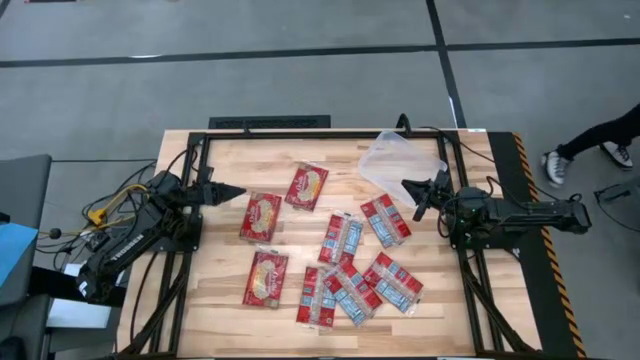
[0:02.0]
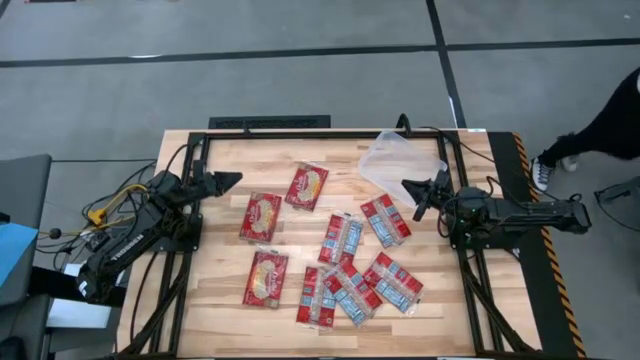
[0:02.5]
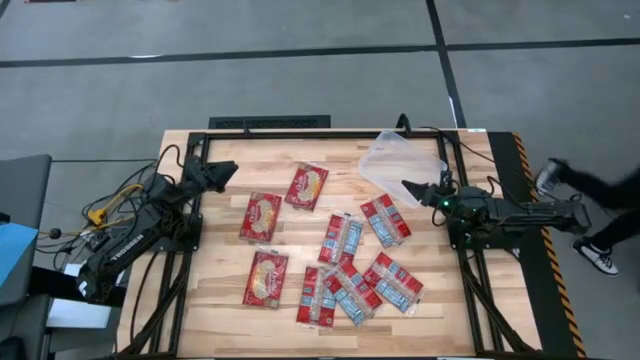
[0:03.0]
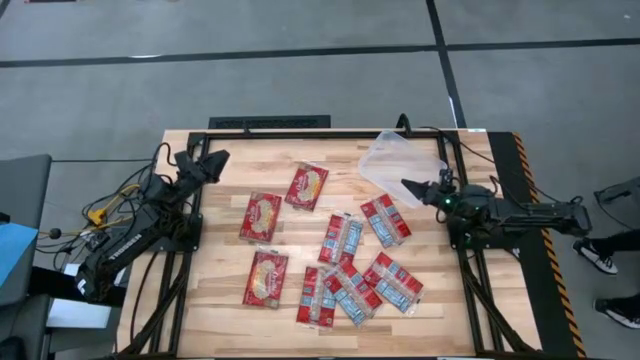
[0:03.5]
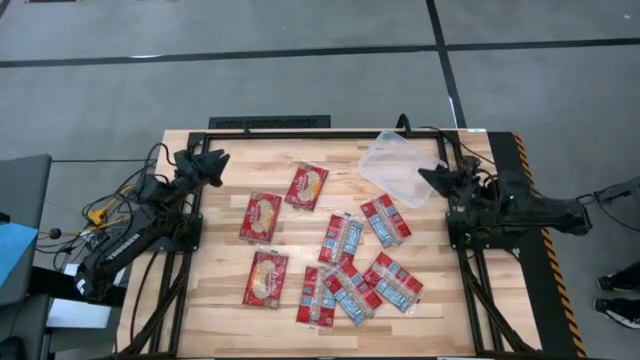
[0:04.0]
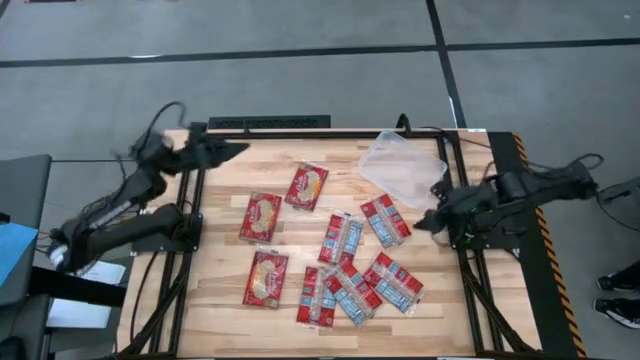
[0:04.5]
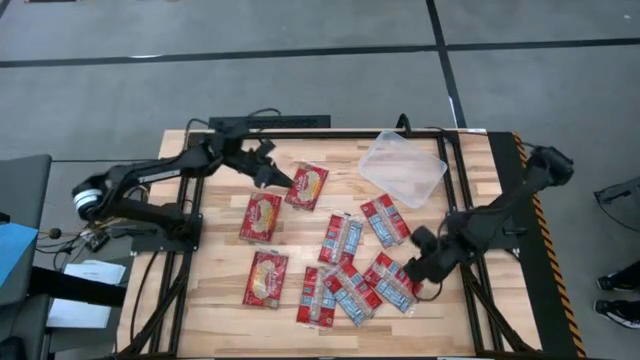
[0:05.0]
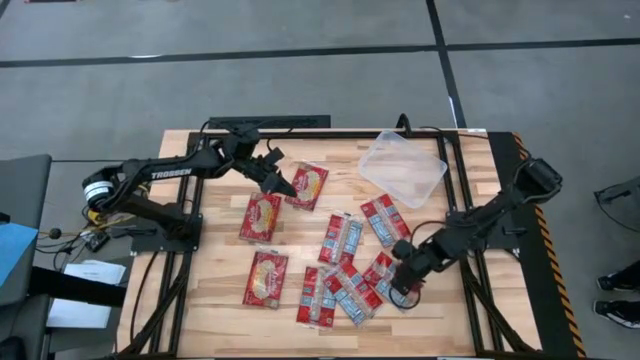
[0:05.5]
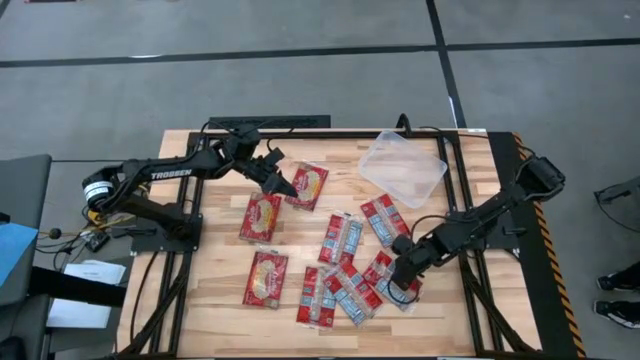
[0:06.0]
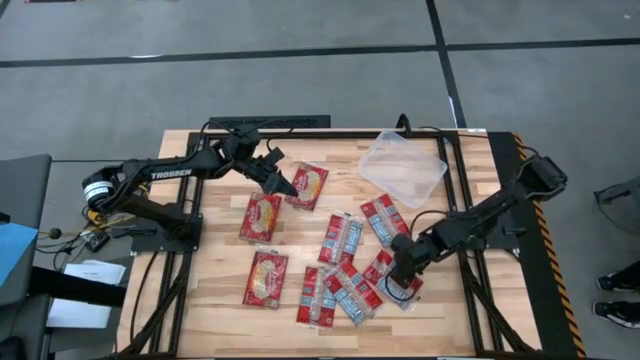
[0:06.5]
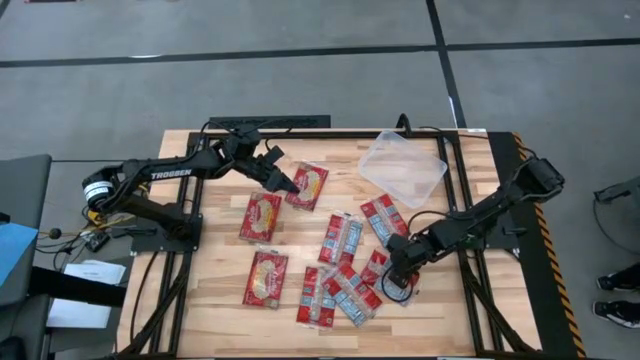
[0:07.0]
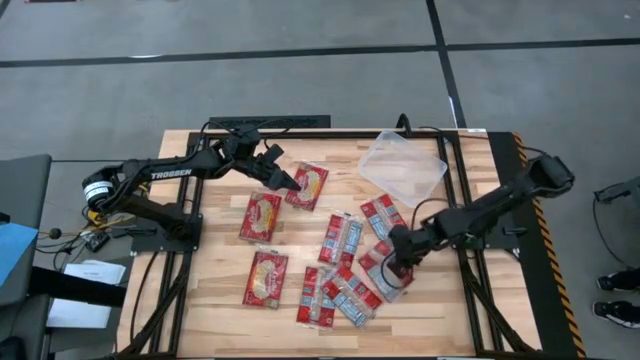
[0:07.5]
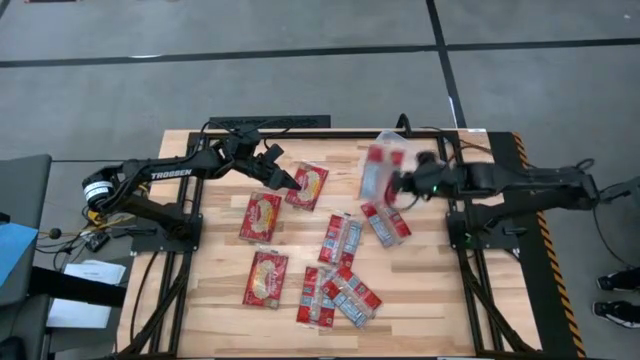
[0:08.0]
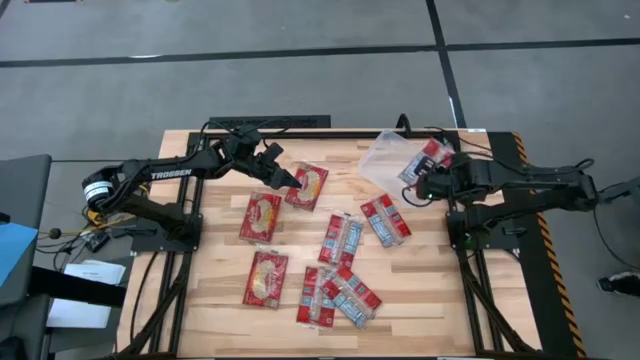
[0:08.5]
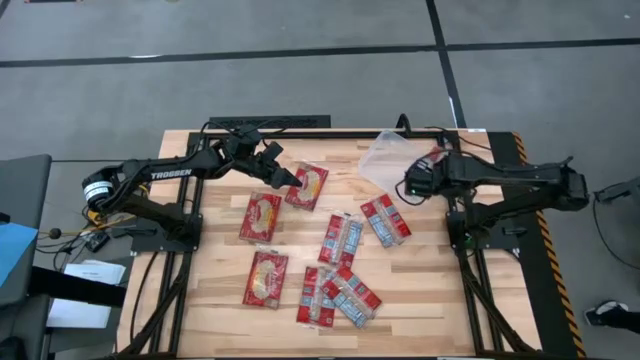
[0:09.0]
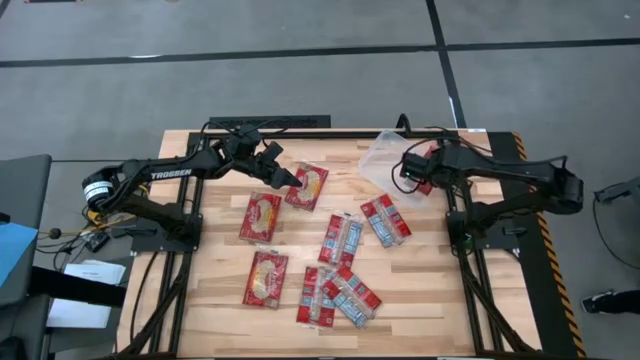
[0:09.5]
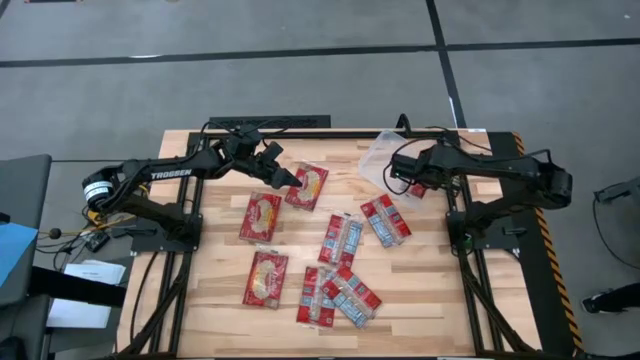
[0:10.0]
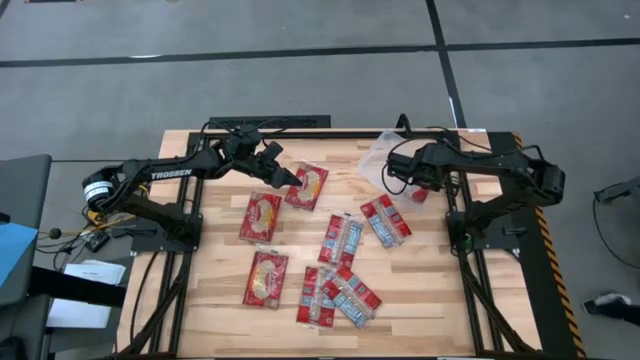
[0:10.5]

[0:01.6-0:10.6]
Task: Sort popcorn bags into baskets
Put the red popcorn bag into the transparent bin

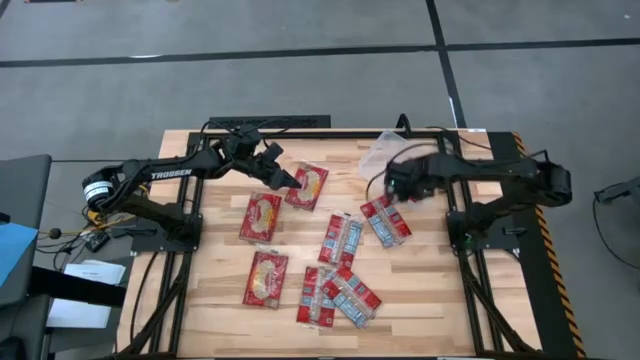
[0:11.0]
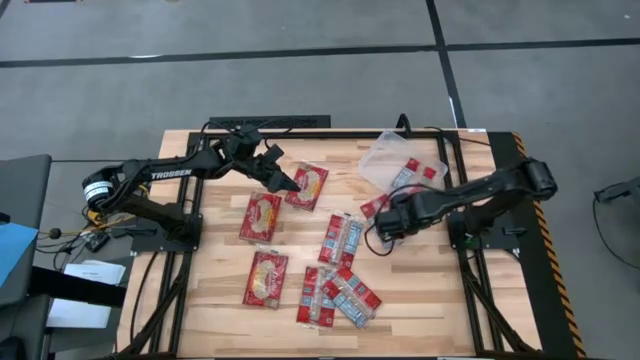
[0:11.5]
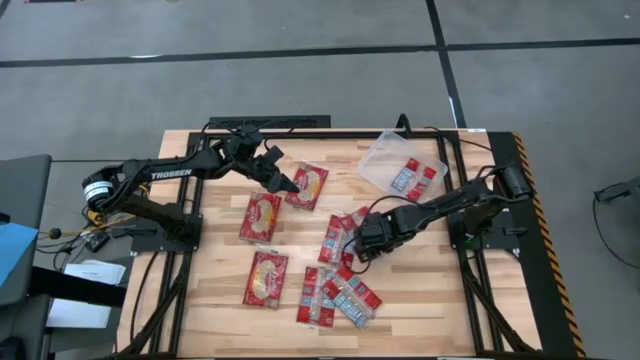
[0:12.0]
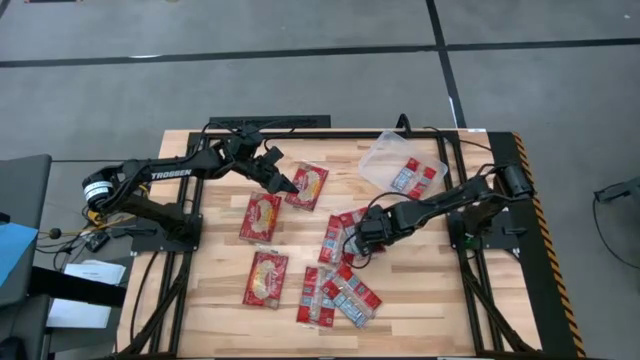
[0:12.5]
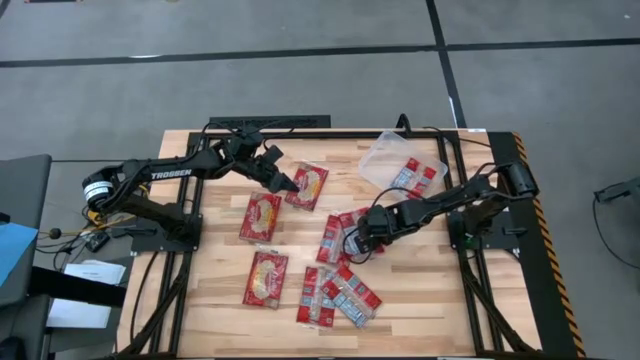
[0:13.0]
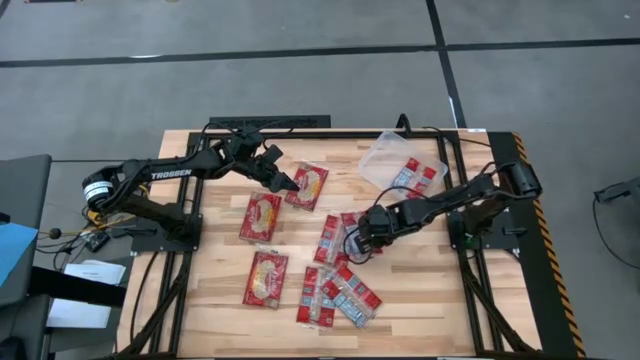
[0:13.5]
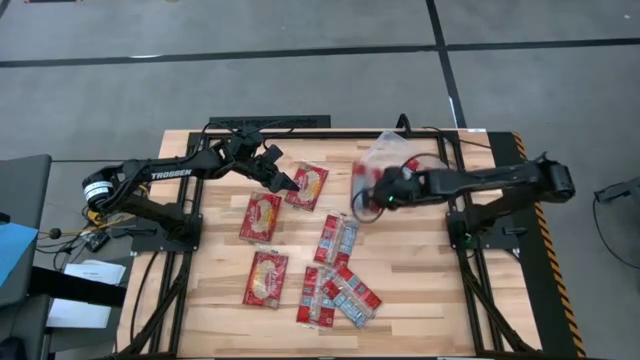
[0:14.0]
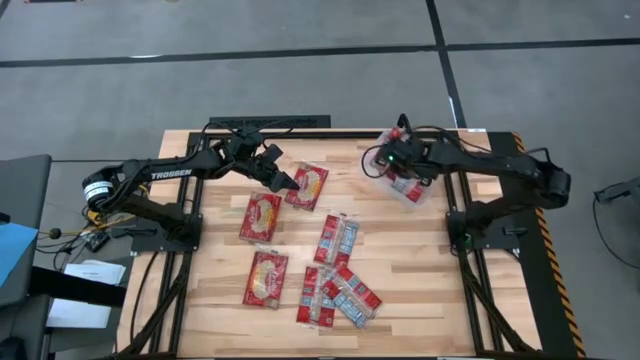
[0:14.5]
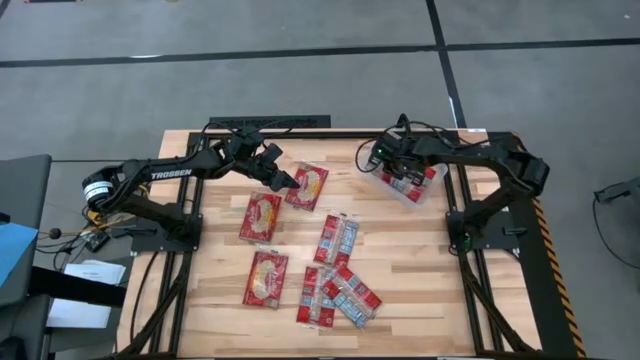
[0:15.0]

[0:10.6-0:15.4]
Put the red popcorn bag into the transparent bin

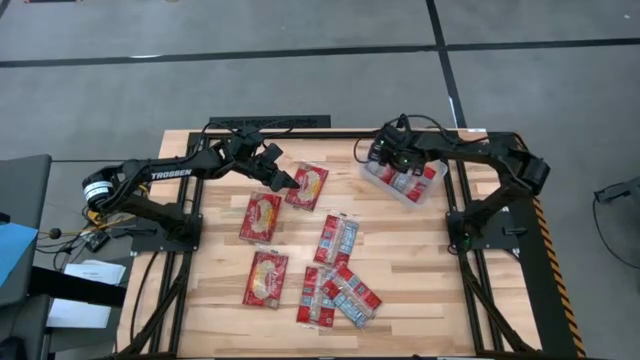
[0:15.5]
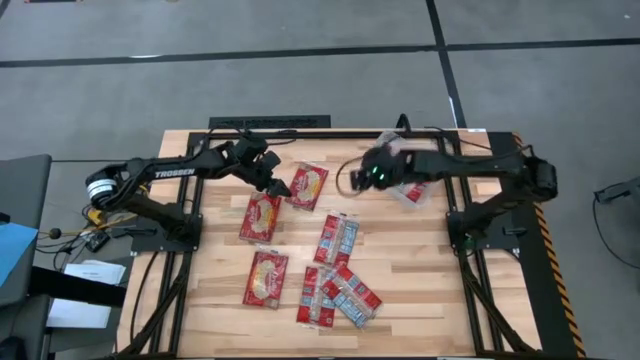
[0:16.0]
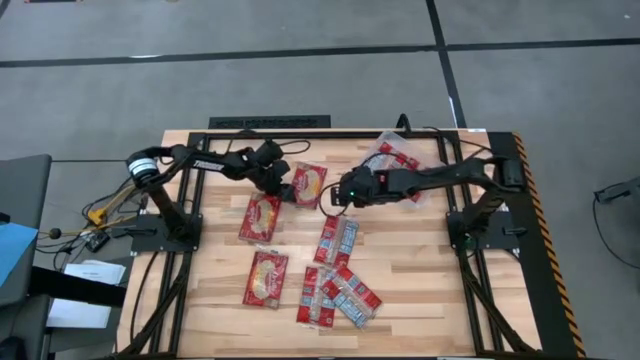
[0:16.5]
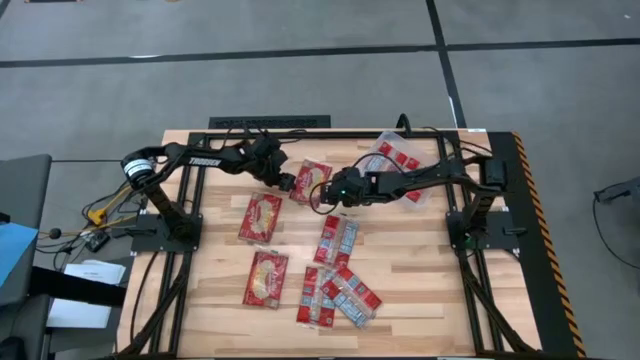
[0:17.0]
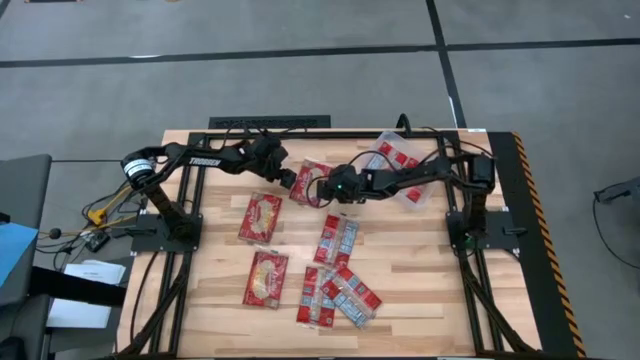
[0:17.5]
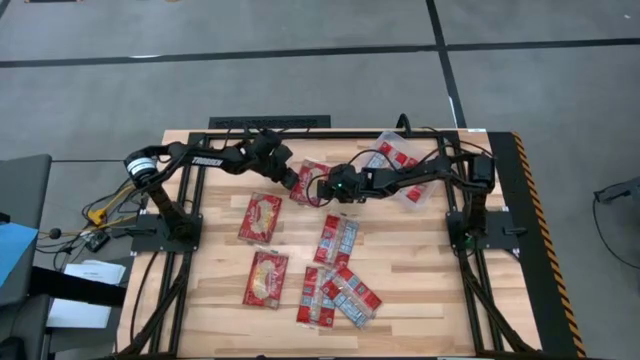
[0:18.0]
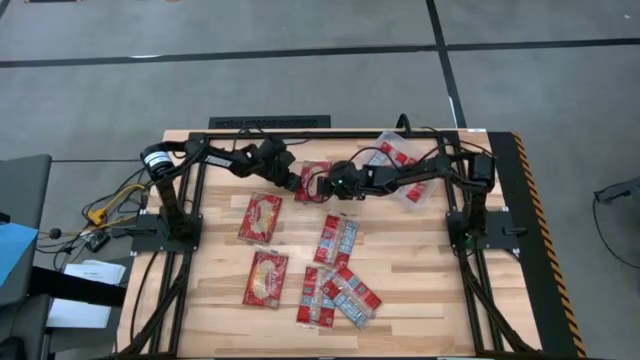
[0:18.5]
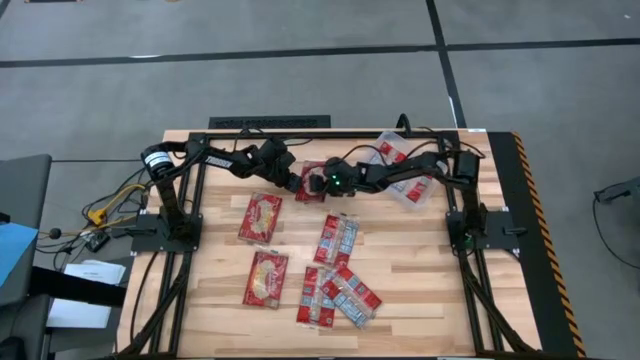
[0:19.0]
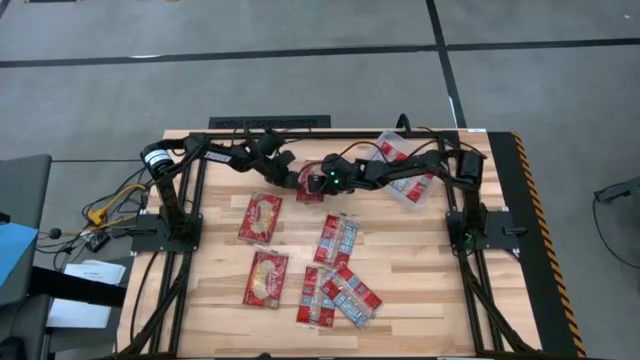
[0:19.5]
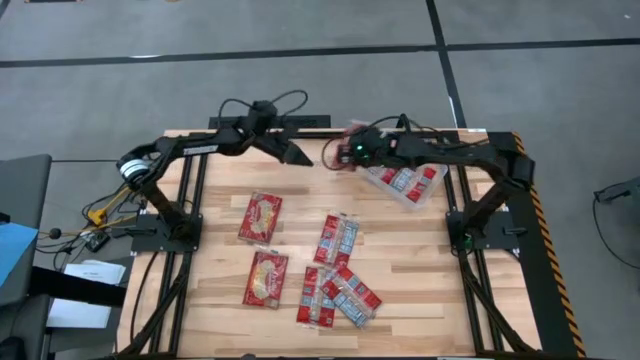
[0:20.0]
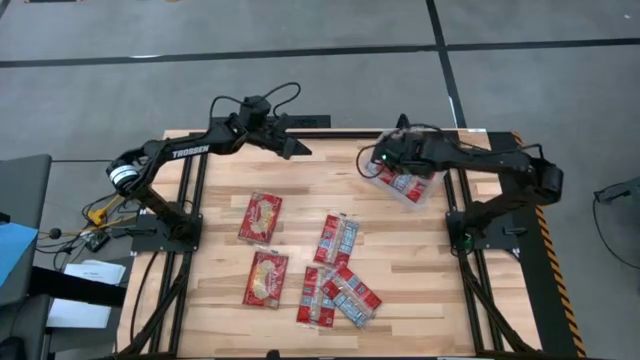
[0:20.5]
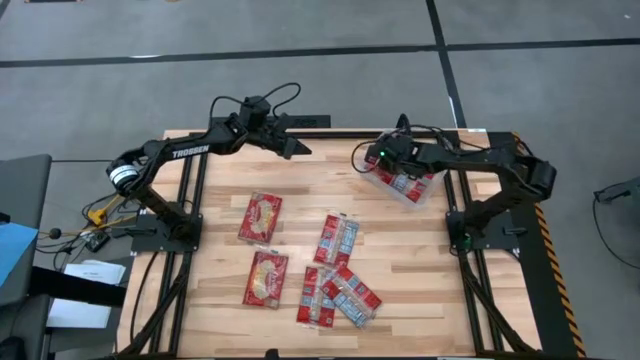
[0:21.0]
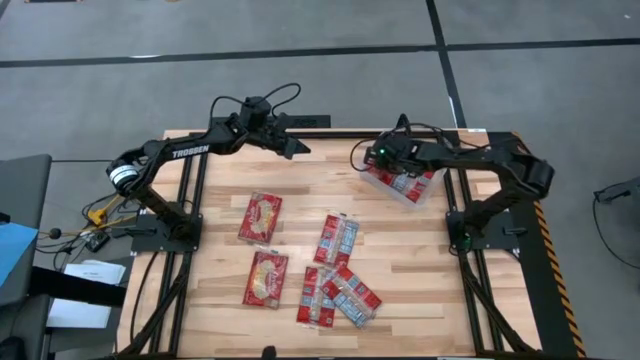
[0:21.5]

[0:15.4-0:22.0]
Put the red popcorn bag into the transparent bin

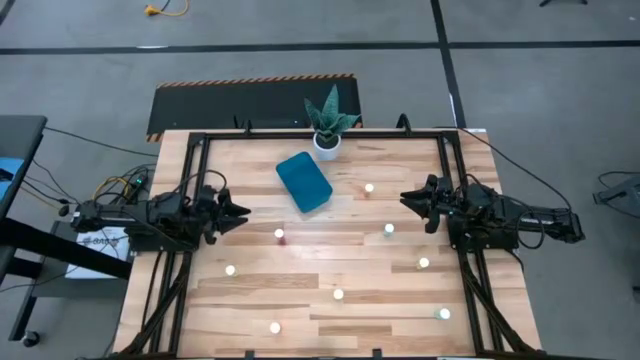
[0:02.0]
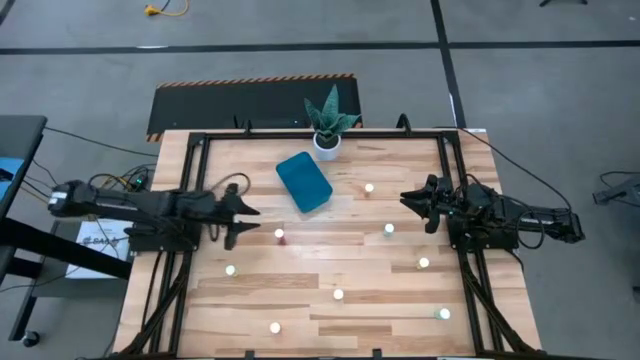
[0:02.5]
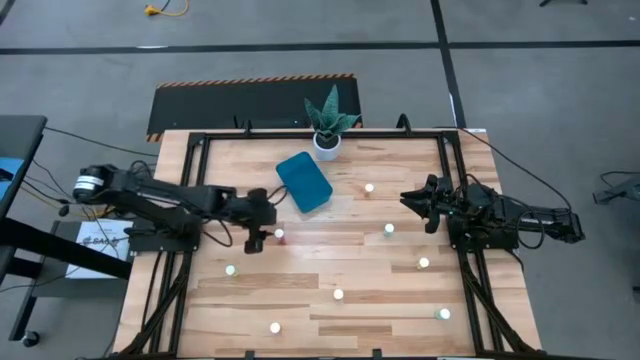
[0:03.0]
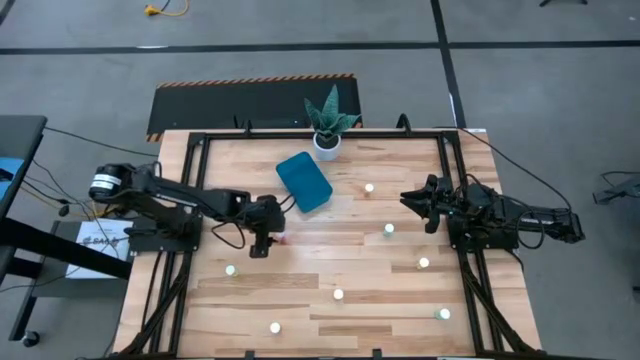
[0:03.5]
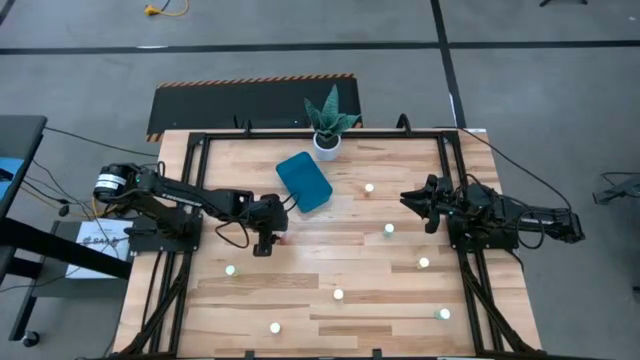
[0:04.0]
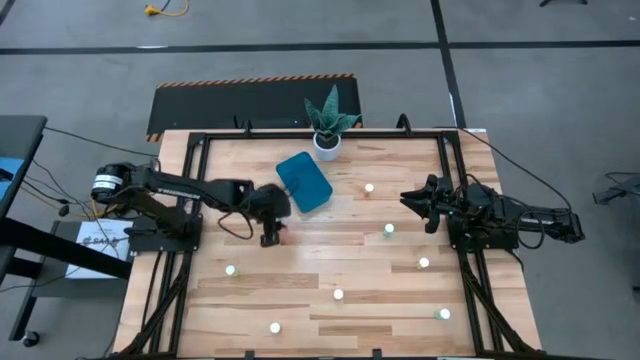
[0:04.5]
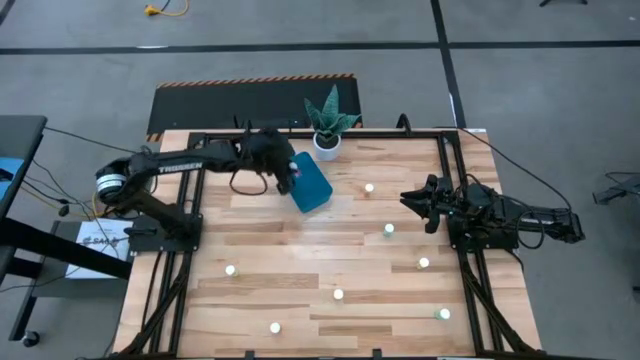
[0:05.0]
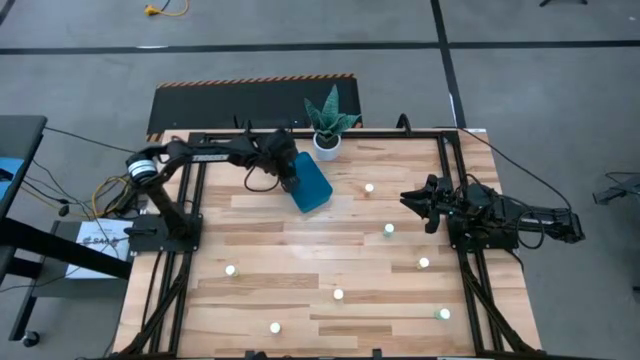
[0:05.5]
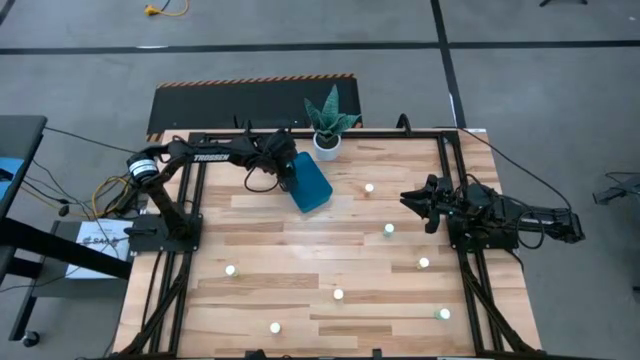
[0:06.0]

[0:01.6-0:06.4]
Task: Pick and place pill bottles into a basket
Put the red pill bottle into the blue bin
